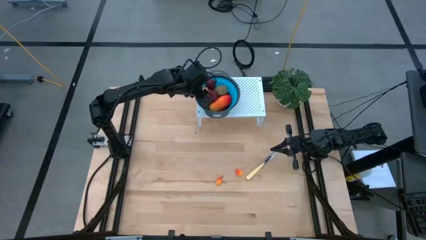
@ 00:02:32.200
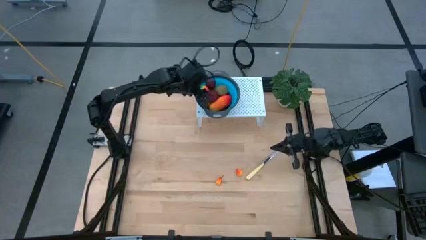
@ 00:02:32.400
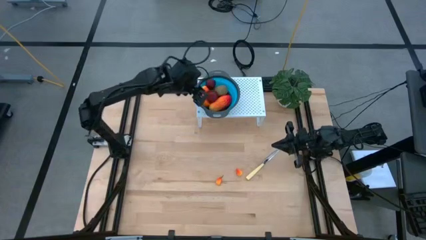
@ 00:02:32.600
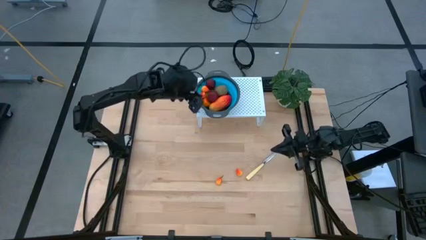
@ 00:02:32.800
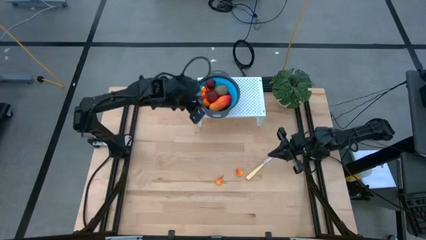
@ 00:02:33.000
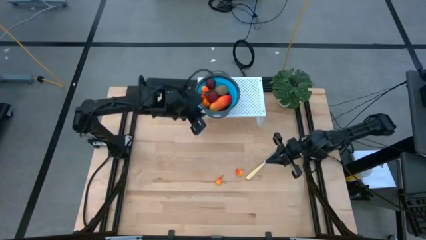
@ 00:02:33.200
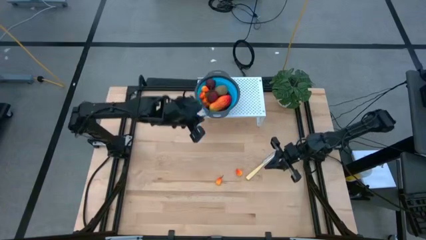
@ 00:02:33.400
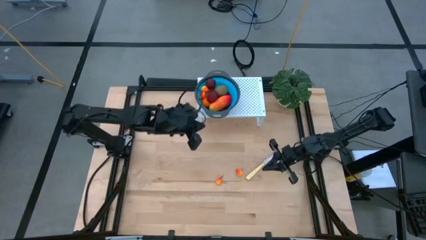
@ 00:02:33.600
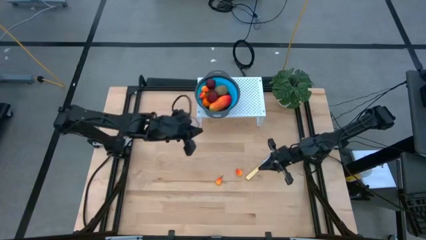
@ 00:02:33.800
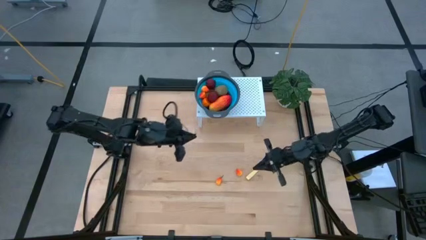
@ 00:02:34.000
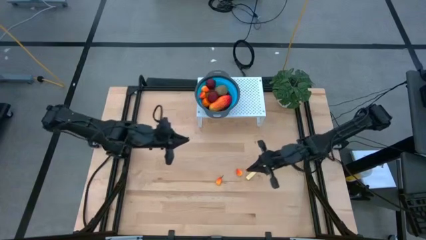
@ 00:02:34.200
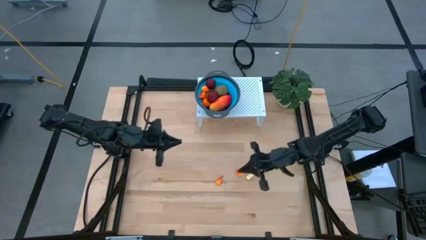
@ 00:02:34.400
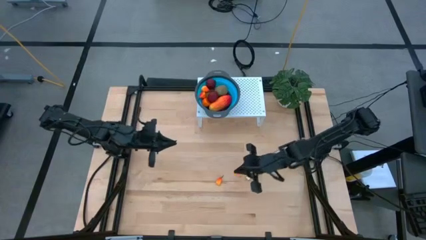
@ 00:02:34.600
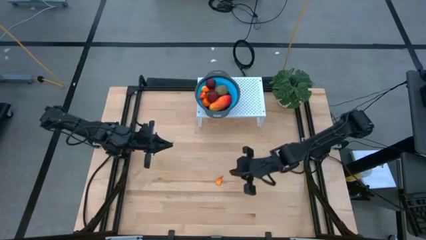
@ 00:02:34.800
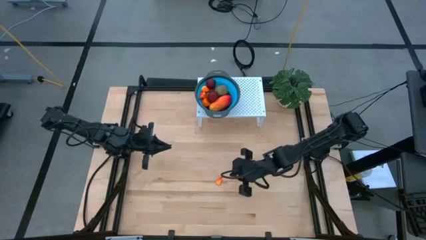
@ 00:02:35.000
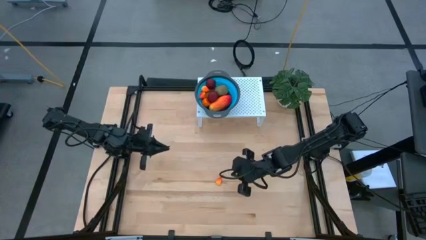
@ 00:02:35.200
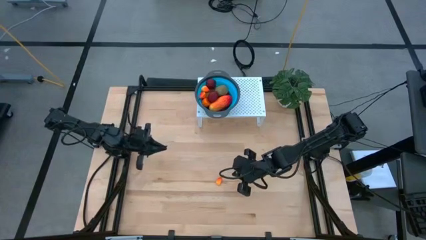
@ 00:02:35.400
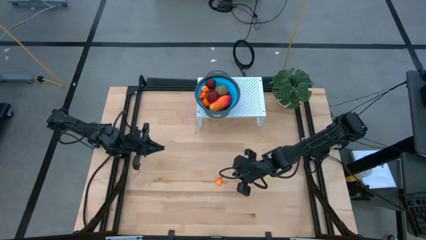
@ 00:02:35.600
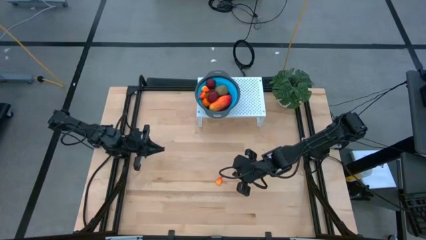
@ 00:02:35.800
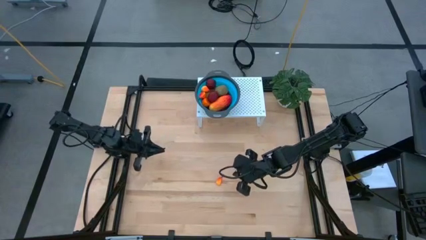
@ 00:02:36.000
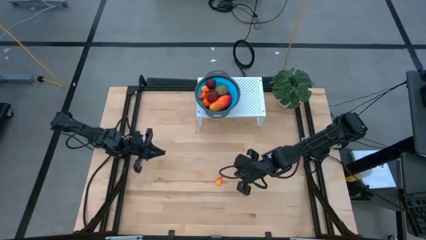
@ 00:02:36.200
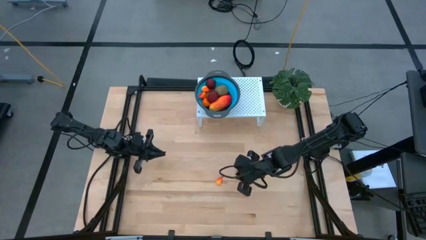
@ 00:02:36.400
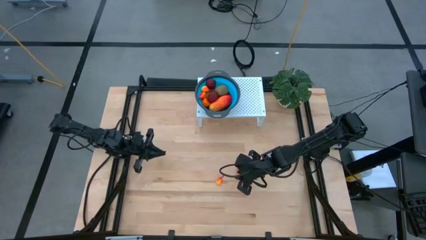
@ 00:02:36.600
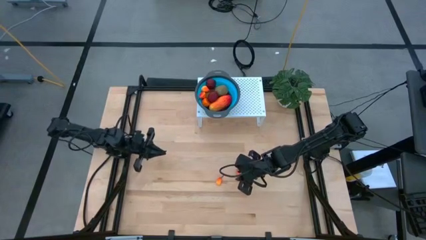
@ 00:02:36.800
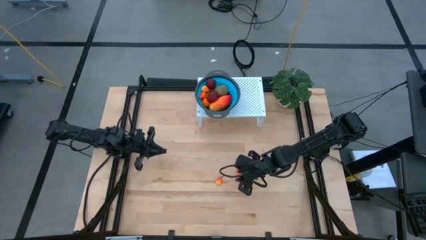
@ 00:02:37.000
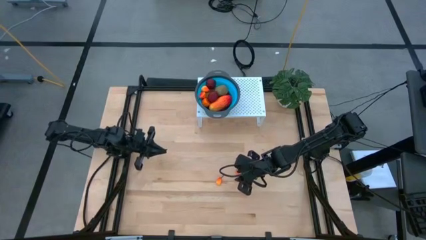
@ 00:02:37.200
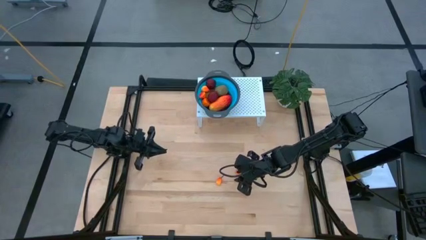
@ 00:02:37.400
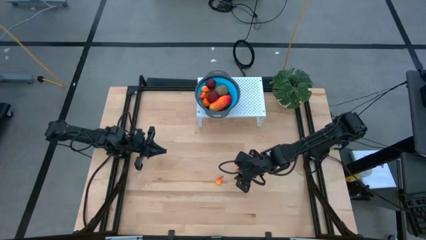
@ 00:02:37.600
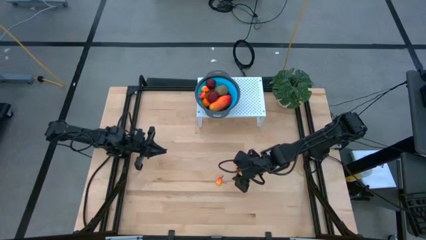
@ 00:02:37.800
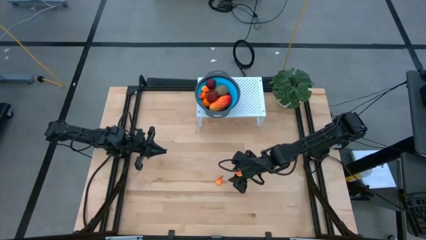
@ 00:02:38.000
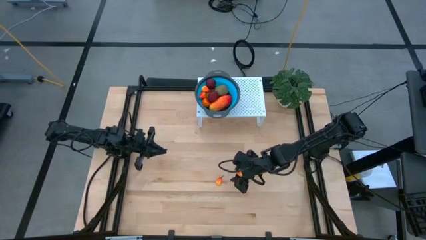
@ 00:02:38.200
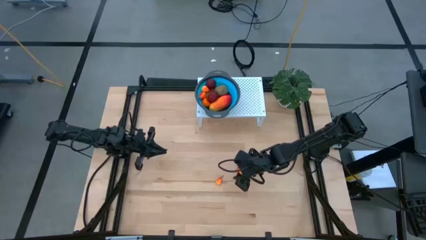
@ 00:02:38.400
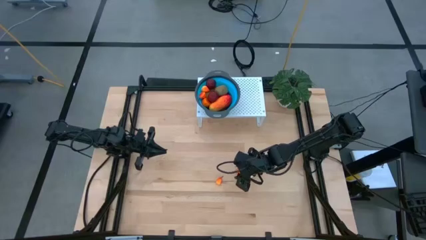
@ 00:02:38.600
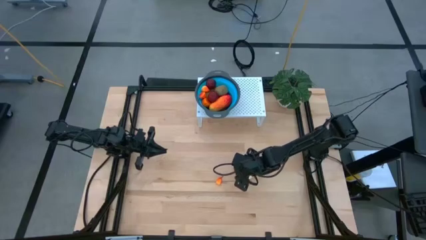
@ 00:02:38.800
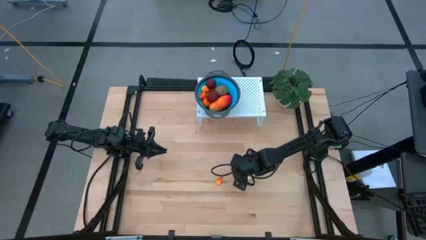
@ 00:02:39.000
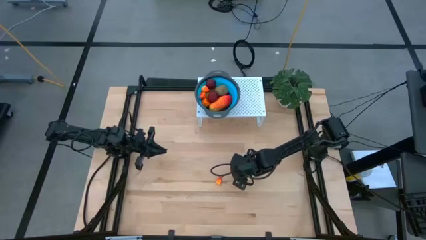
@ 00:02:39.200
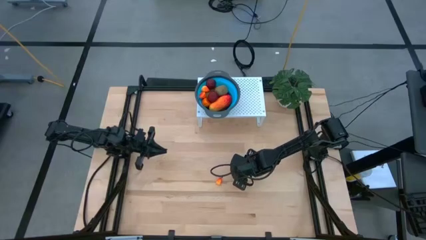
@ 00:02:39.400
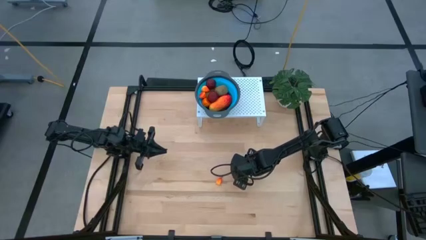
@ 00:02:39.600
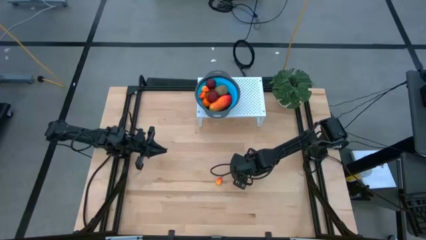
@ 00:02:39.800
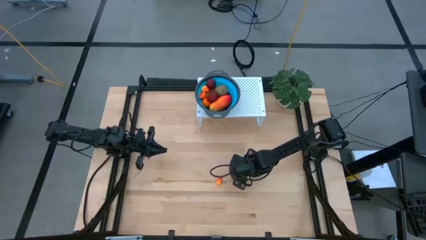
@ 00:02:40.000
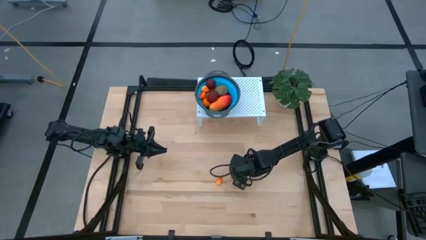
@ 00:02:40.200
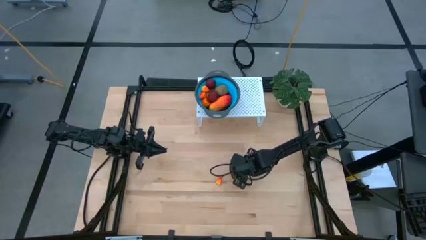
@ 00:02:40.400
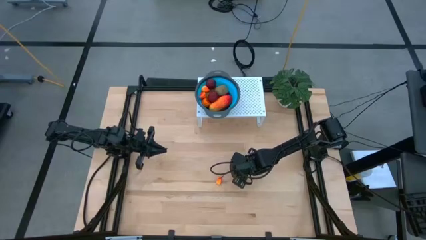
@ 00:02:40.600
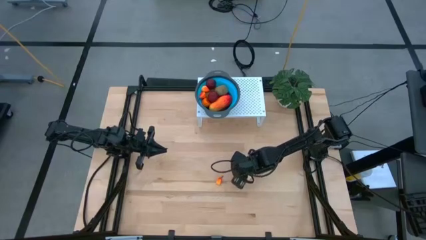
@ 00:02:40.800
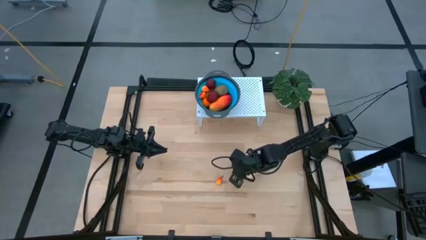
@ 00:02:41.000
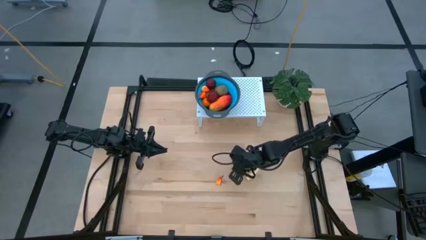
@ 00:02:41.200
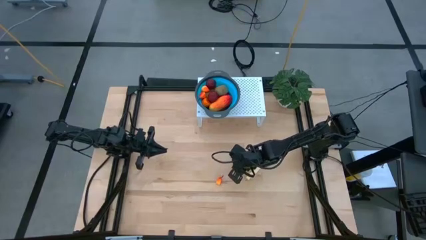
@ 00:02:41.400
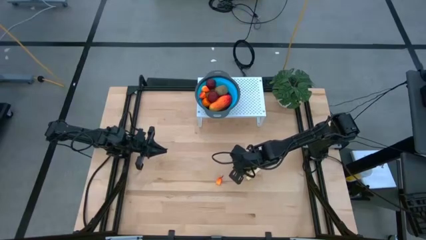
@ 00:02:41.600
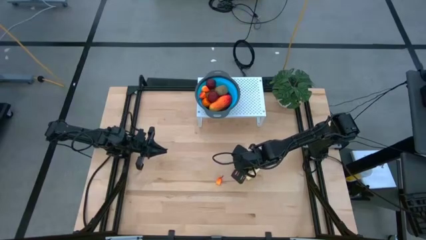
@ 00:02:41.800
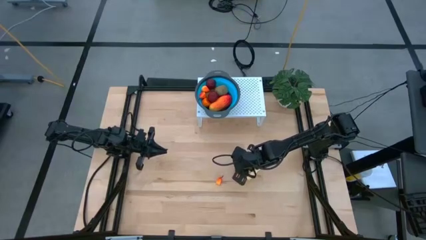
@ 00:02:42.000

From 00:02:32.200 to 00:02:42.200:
Task: Pick & Place Fruit
Put the right pear into the blue strainer bowl on the shelf

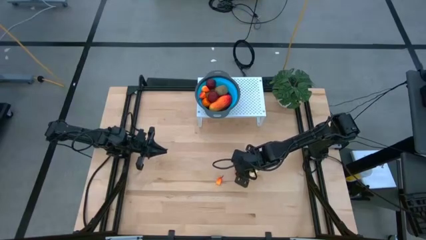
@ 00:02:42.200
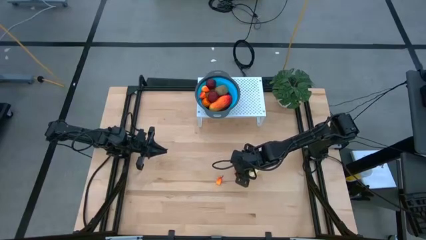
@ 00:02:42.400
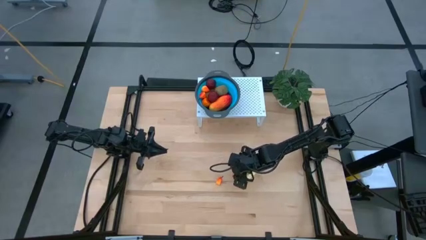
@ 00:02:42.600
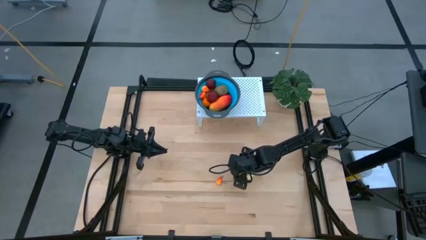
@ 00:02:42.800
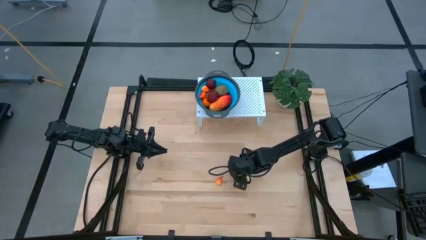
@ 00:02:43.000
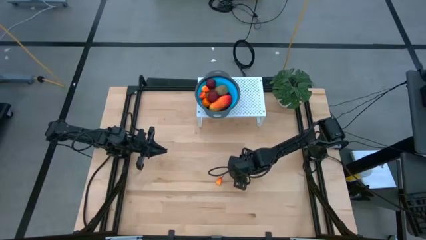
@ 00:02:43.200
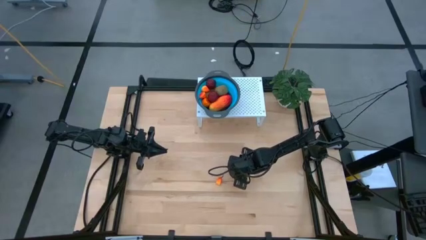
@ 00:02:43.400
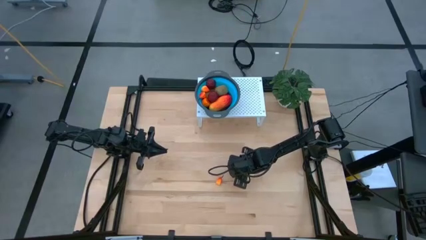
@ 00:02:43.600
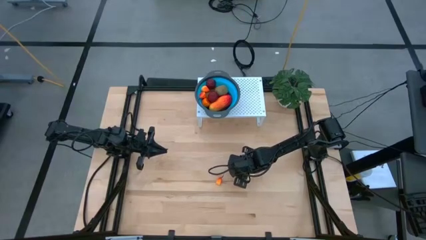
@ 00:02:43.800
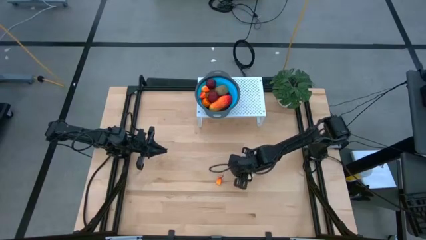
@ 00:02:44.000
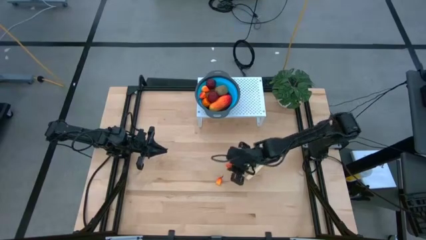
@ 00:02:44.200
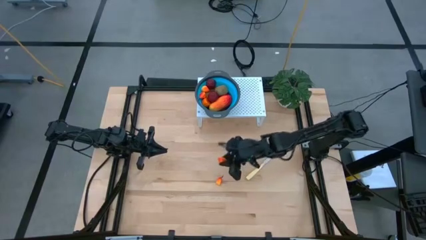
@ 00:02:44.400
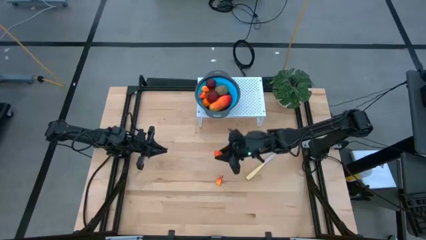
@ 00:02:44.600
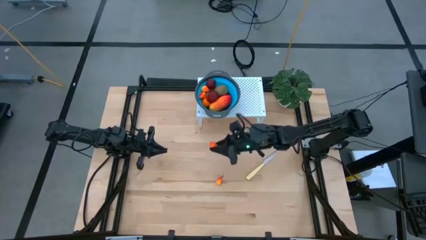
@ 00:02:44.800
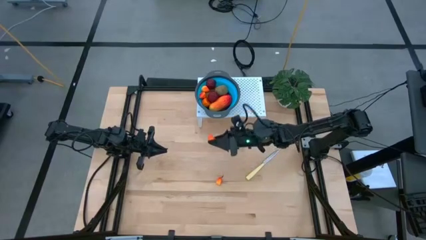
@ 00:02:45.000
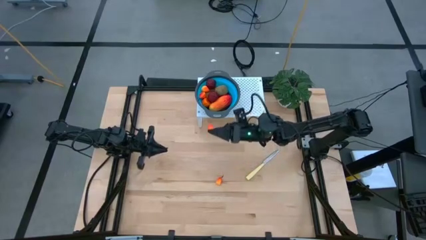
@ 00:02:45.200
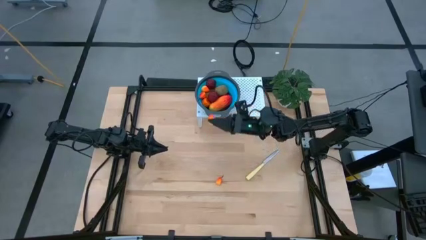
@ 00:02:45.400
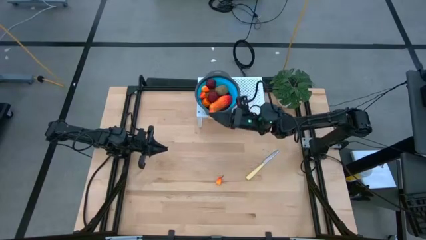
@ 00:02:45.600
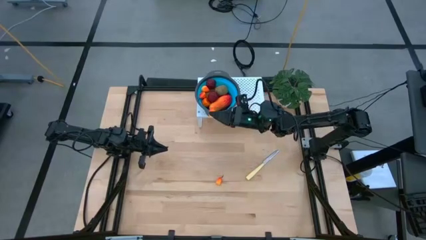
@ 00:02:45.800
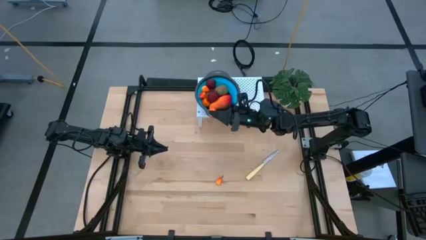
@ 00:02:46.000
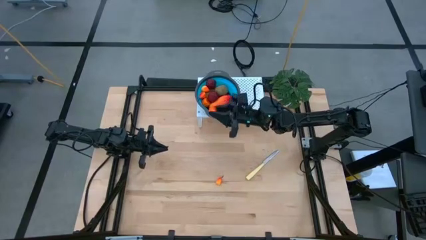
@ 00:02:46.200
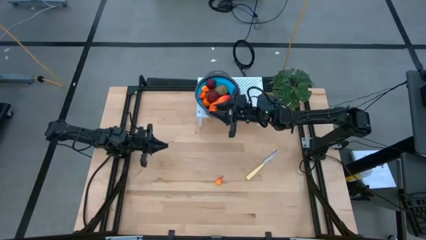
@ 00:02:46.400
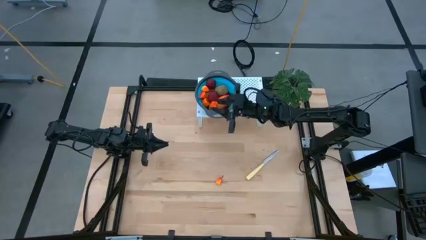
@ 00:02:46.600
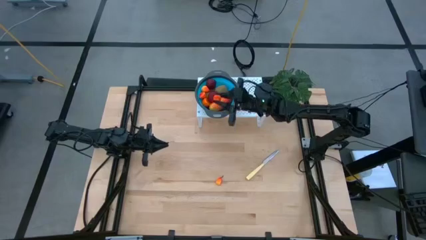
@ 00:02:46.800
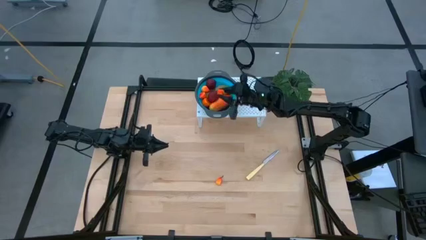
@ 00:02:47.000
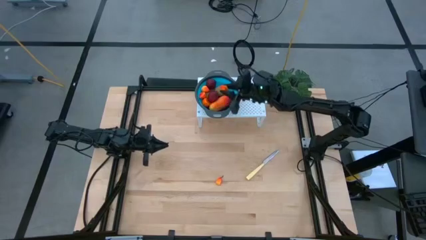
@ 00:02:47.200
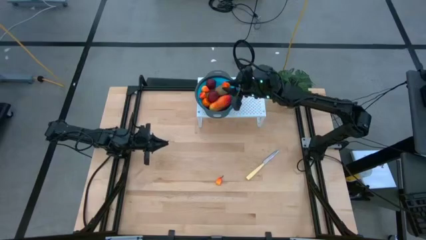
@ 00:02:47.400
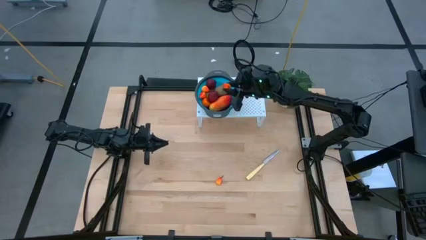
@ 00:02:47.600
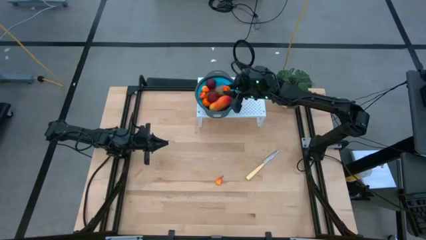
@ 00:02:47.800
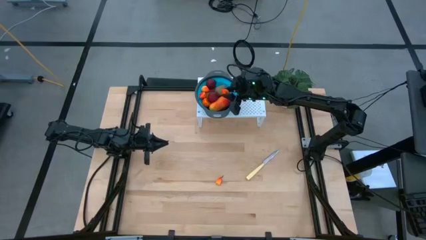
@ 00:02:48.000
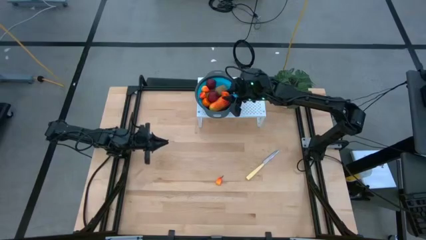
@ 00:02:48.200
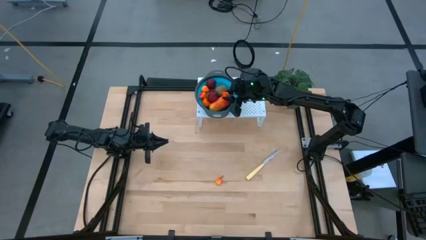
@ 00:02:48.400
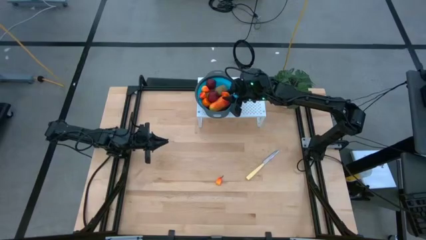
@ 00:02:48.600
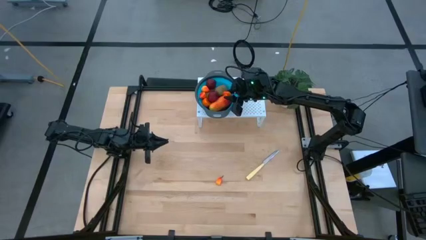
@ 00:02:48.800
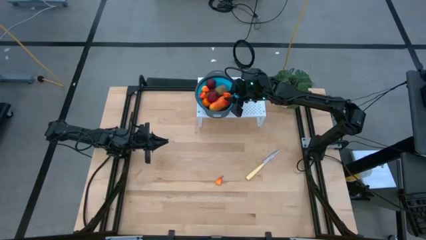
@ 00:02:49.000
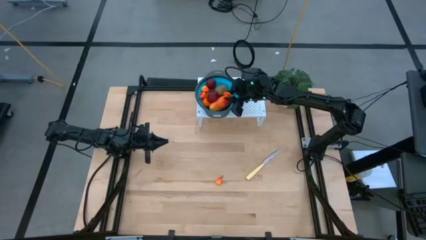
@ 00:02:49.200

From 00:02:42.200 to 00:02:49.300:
Put the right pear into the blue strainer bowl on the shelf
